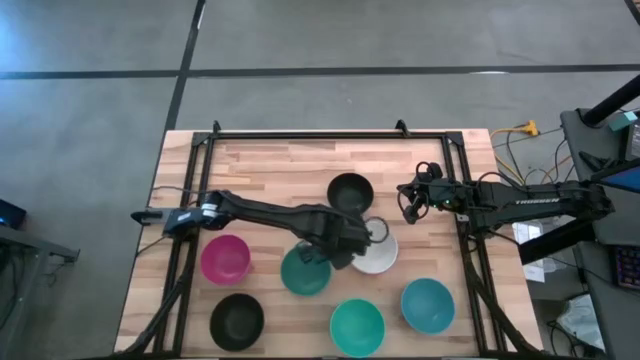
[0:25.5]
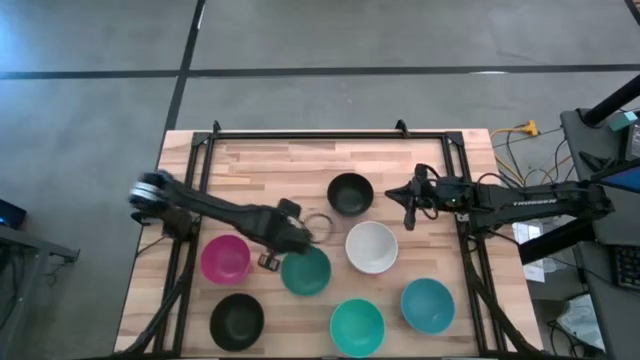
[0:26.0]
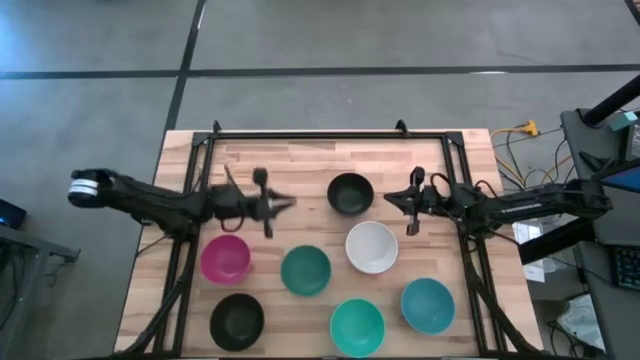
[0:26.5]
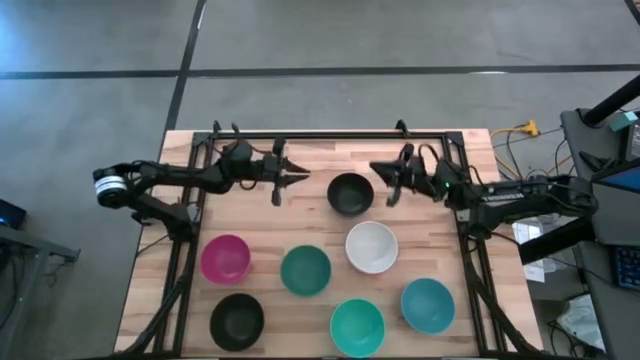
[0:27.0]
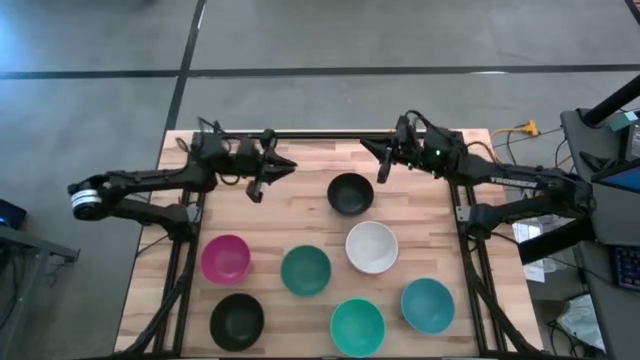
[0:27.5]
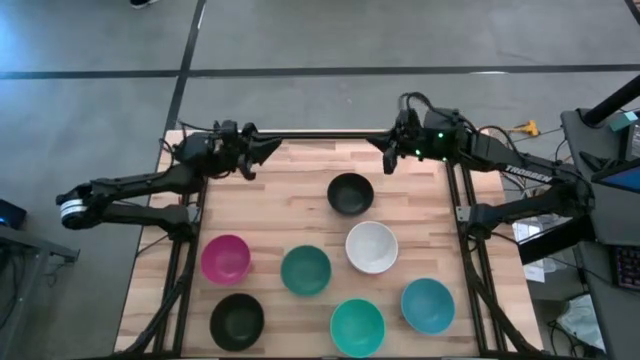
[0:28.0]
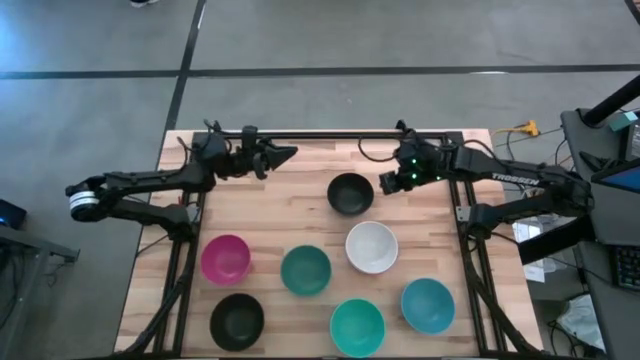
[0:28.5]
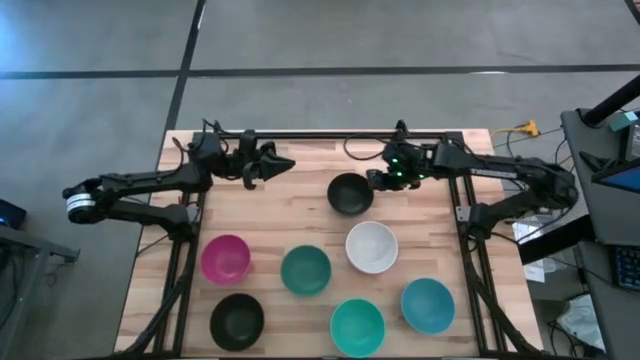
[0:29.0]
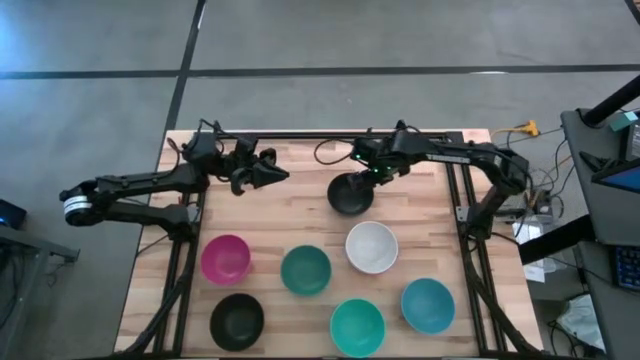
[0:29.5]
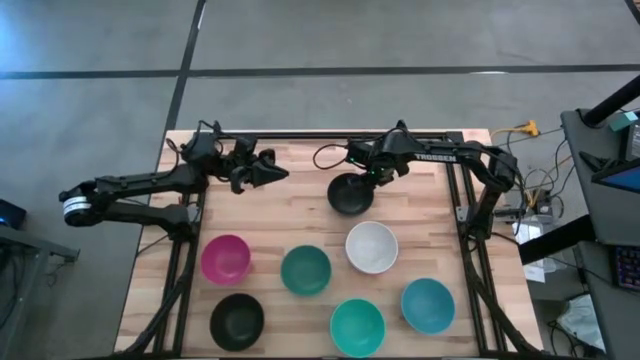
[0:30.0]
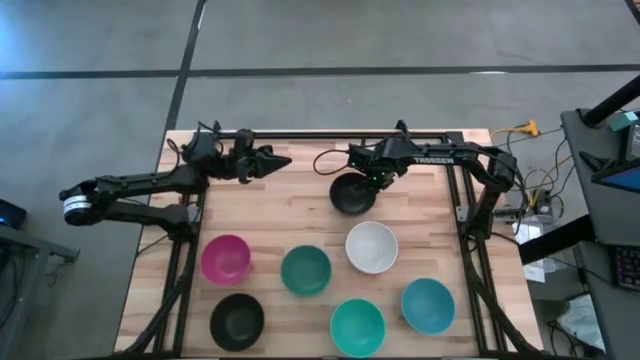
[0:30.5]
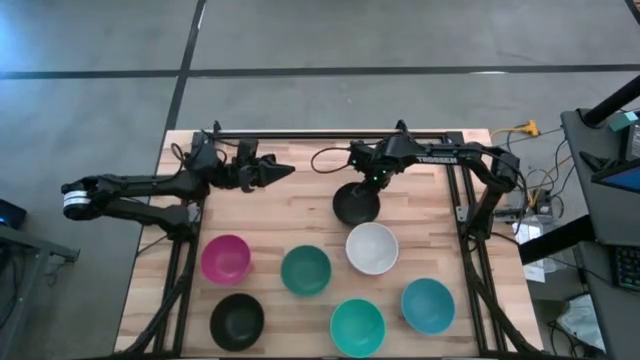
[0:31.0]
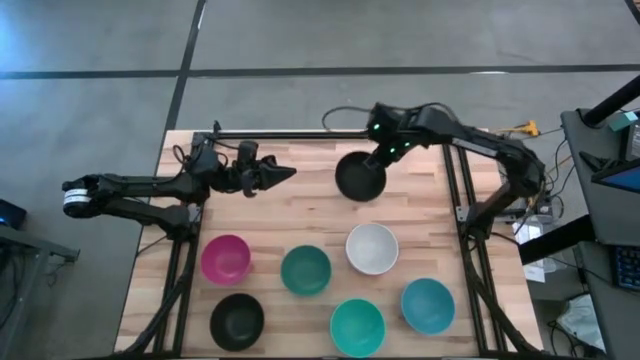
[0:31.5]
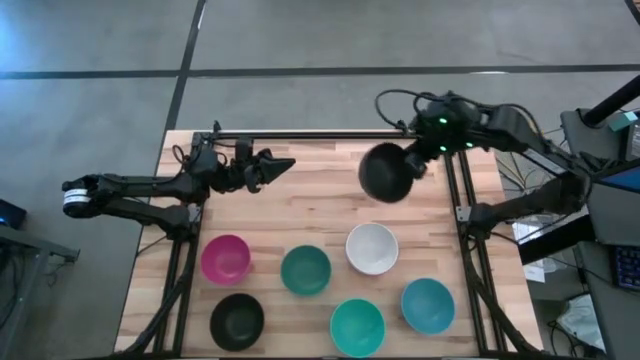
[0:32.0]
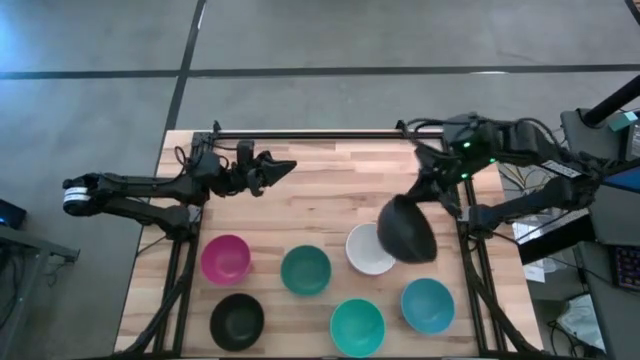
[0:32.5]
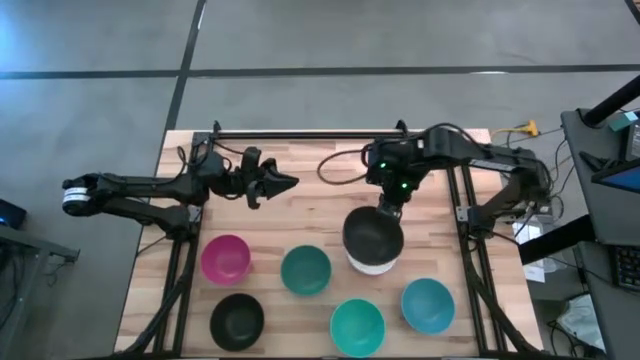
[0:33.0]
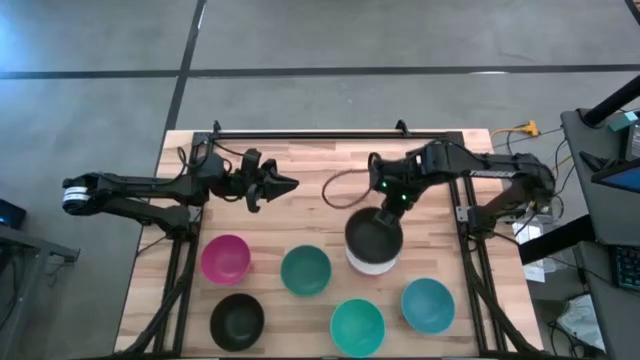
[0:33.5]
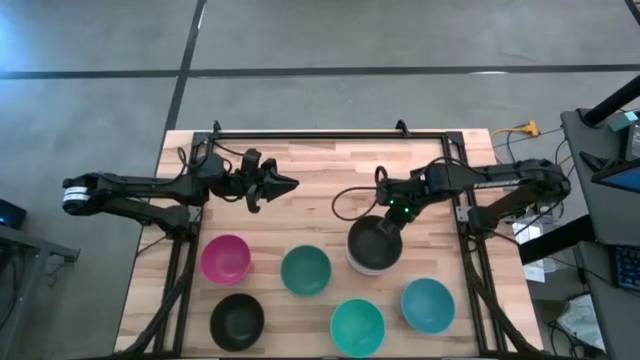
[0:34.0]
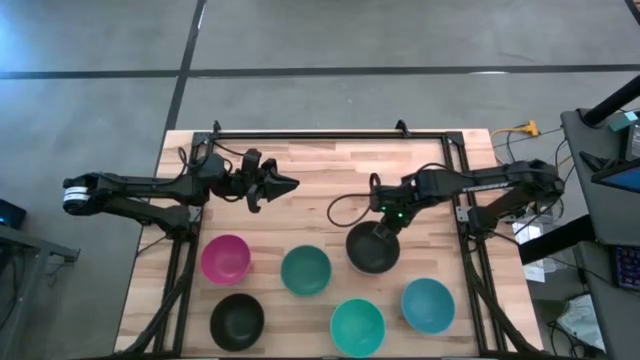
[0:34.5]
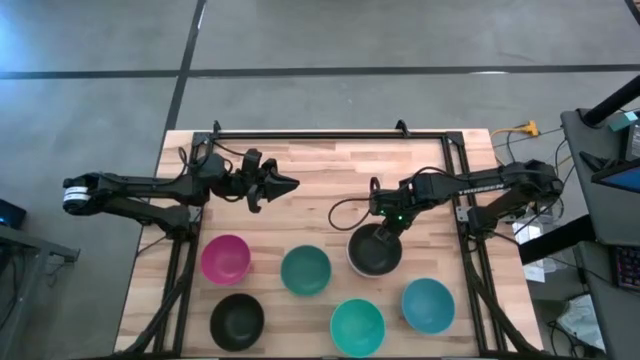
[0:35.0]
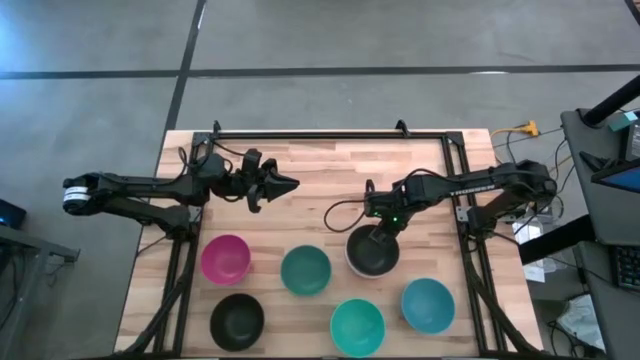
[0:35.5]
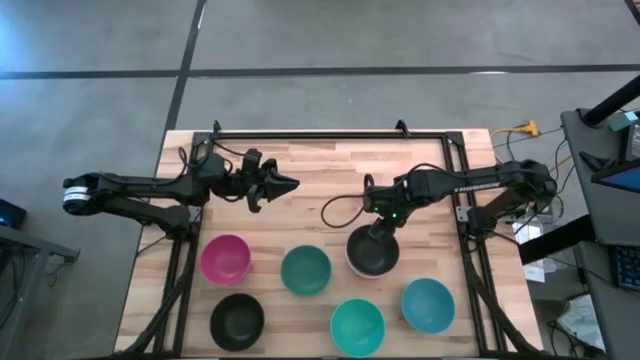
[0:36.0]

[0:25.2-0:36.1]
Task: Nest bowls inside each other
Stack the top black bowl on top of the white bowl

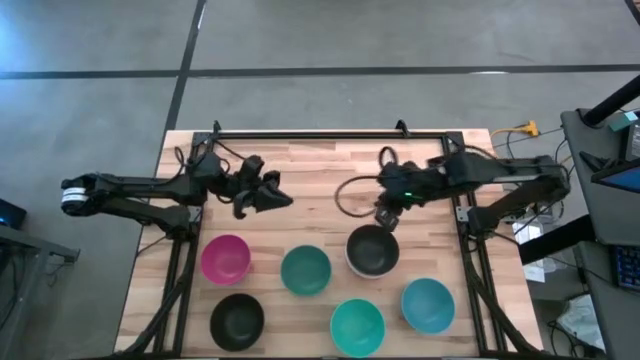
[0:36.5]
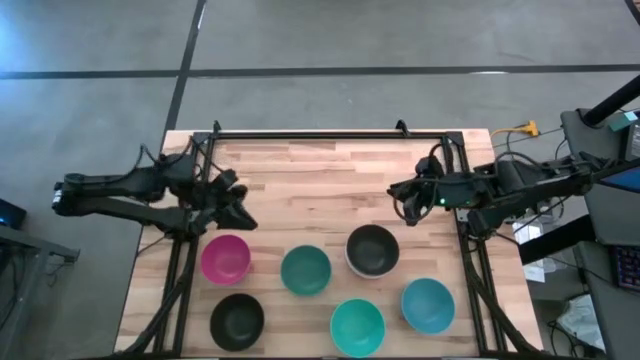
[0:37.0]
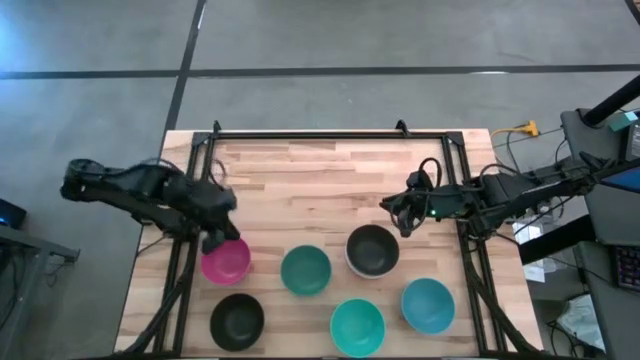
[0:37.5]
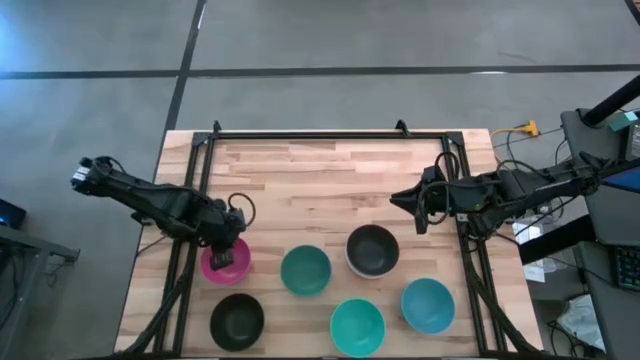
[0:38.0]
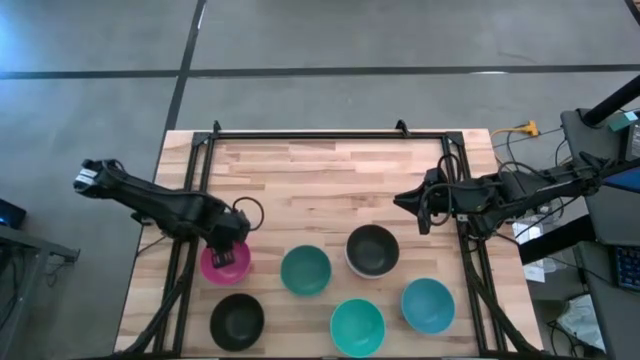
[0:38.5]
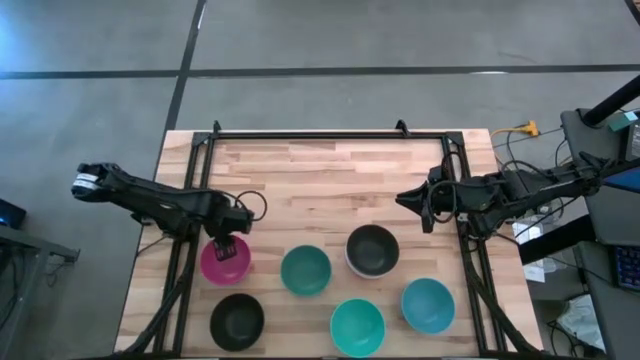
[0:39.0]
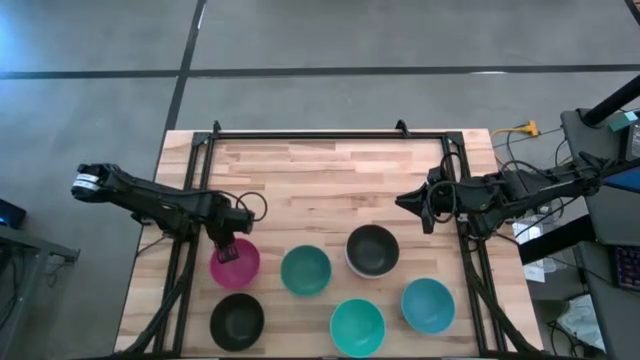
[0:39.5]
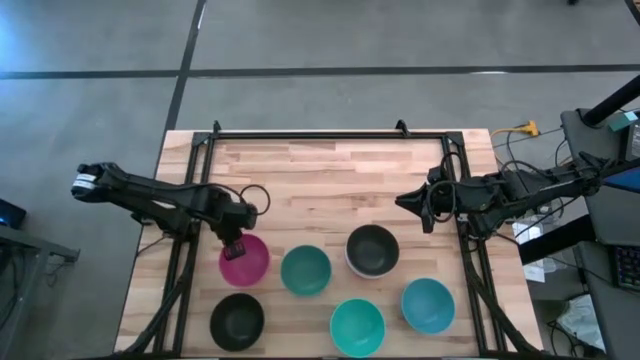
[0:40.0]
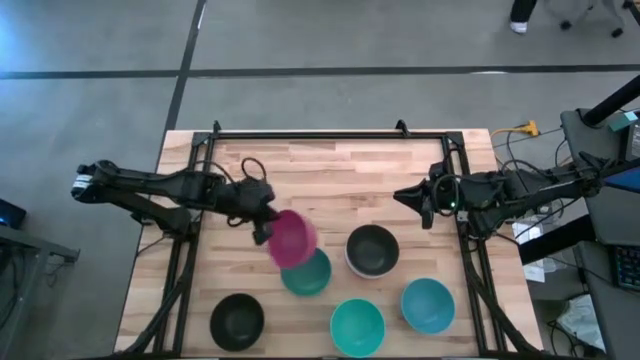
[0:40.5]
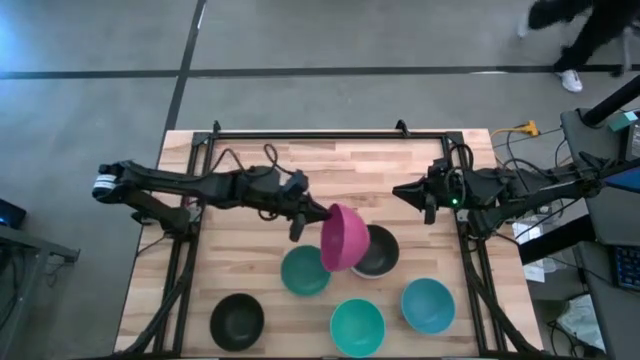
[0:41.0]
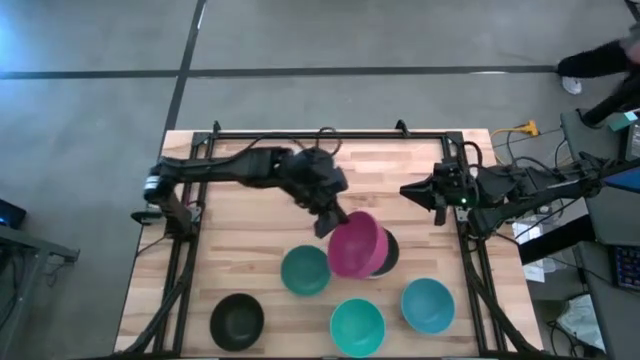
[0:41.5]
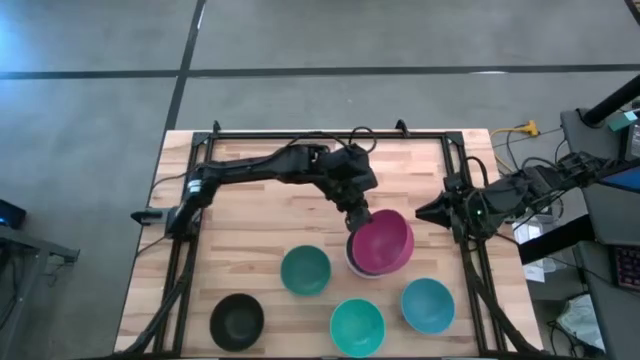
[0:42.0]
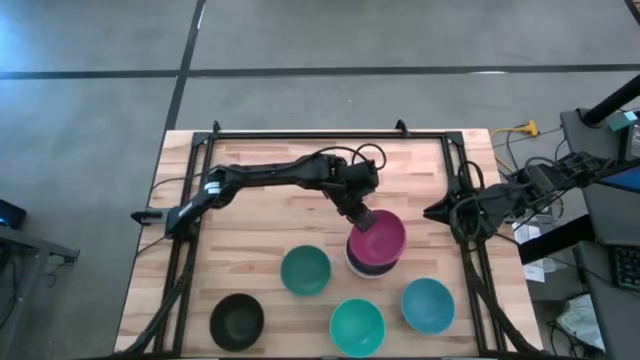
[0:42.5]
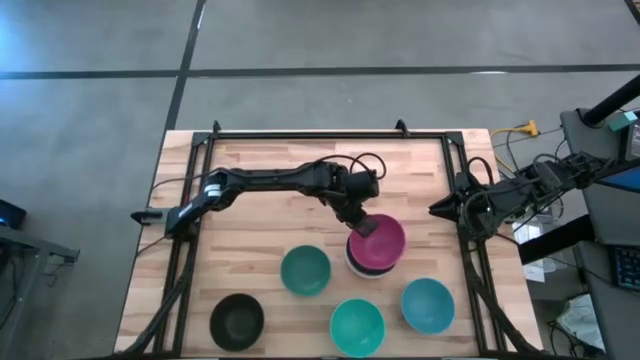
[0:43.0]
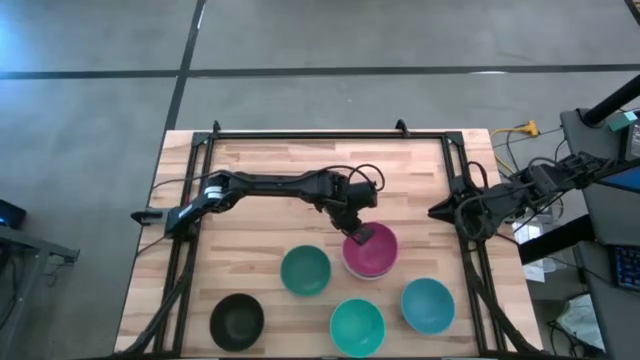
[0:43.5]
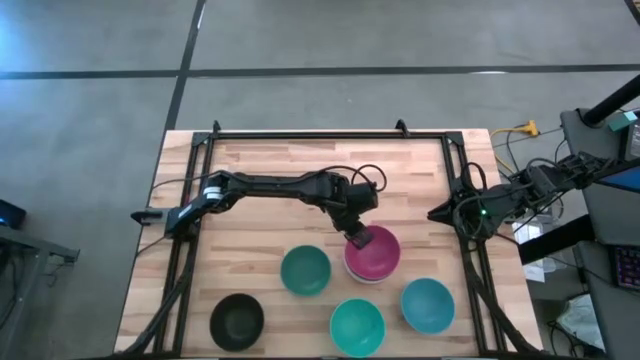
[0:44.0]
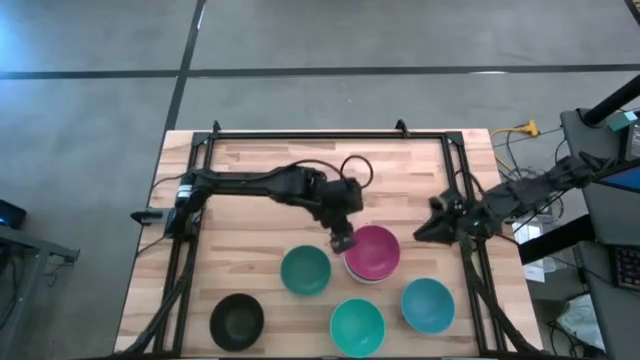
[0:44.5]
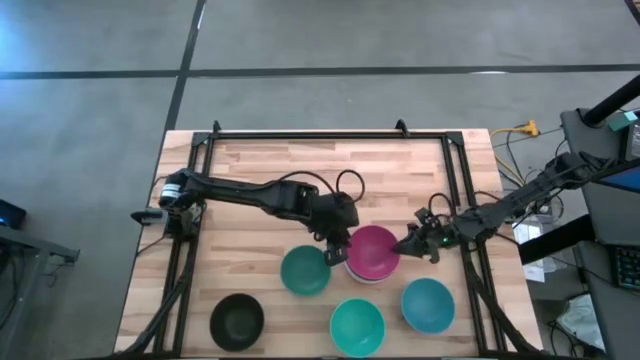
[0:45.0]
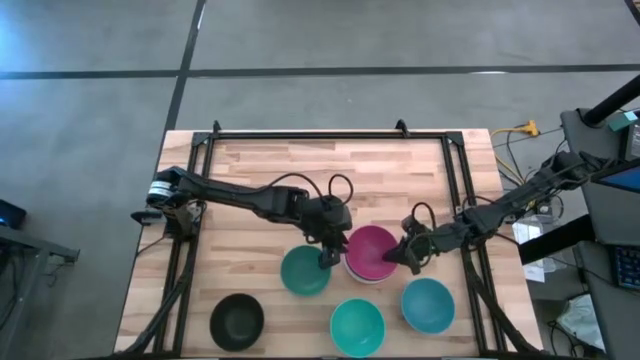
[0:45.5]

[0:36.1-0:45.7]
Stack the pink bowl on top of the right black bowl
